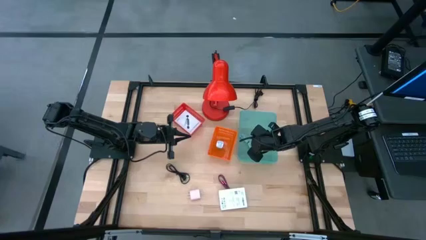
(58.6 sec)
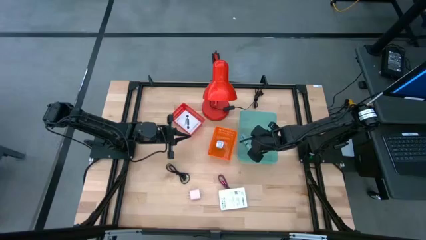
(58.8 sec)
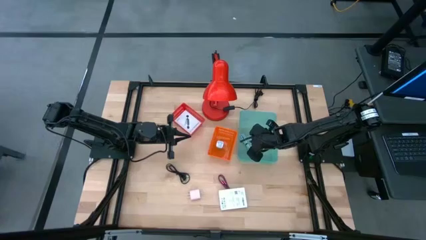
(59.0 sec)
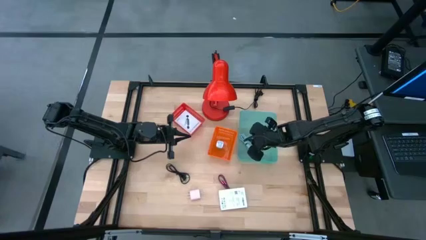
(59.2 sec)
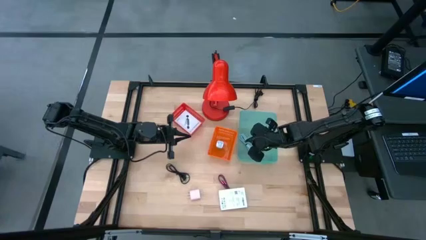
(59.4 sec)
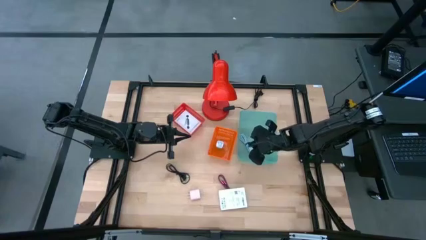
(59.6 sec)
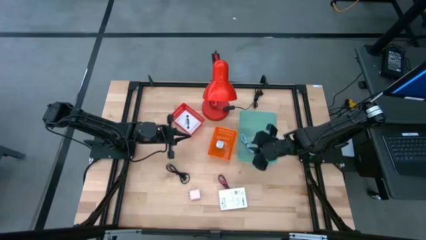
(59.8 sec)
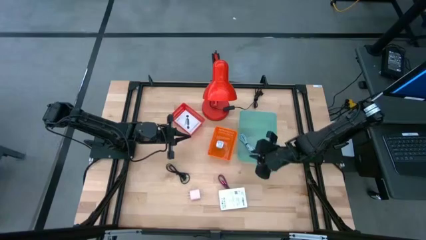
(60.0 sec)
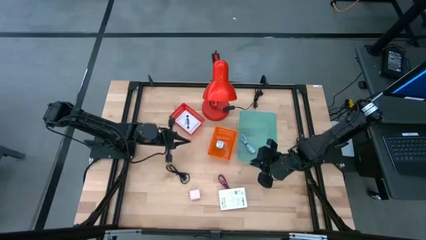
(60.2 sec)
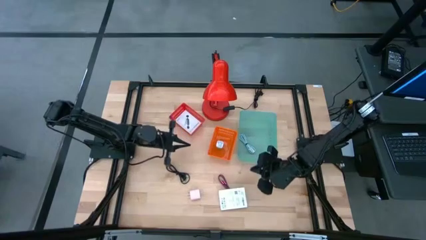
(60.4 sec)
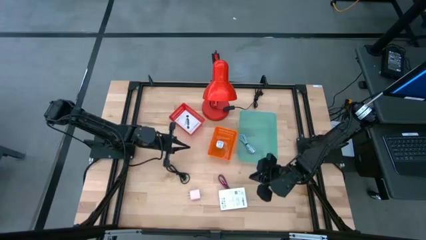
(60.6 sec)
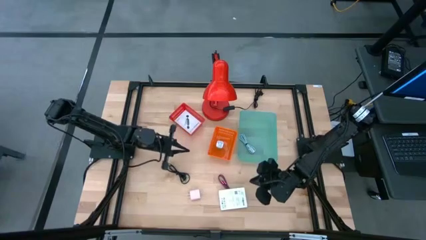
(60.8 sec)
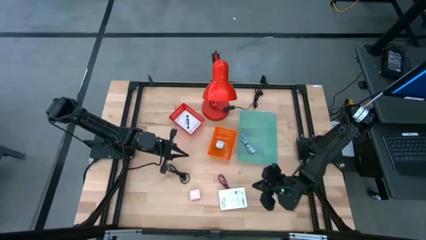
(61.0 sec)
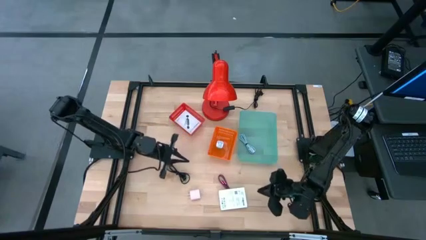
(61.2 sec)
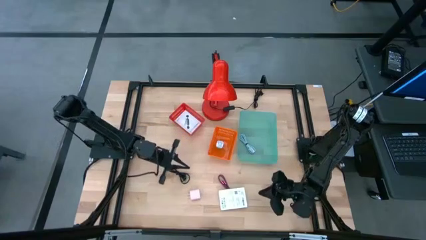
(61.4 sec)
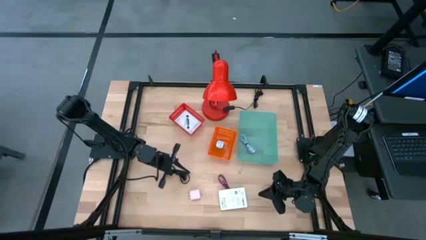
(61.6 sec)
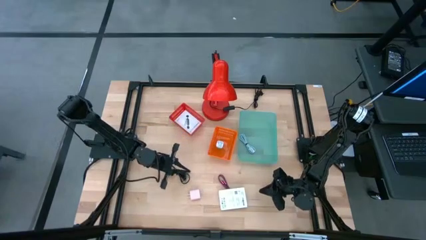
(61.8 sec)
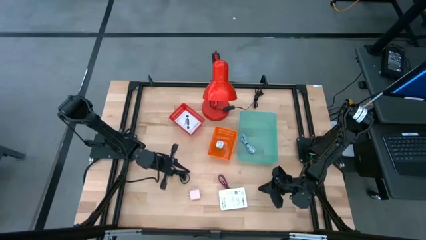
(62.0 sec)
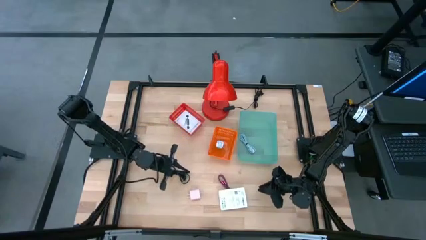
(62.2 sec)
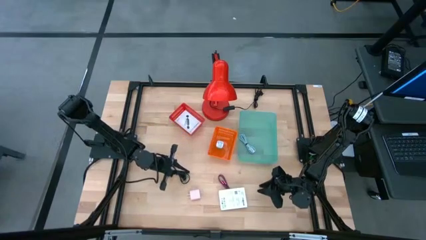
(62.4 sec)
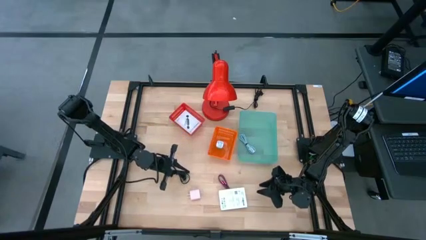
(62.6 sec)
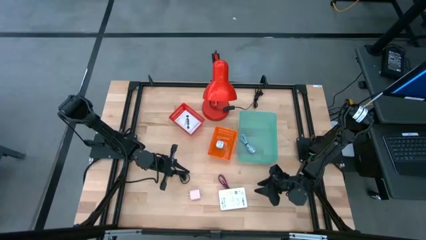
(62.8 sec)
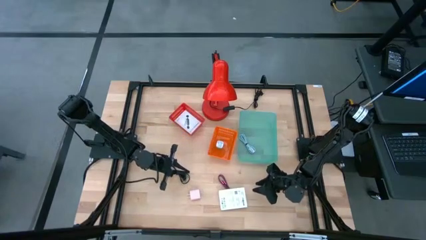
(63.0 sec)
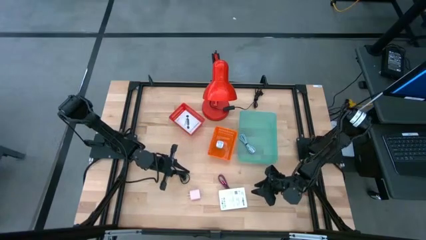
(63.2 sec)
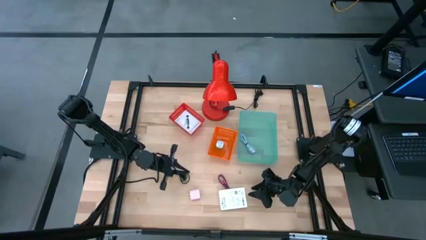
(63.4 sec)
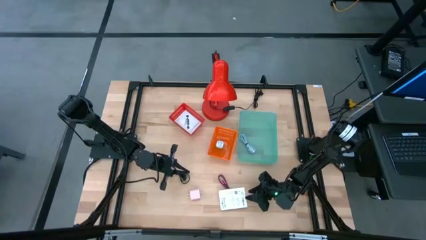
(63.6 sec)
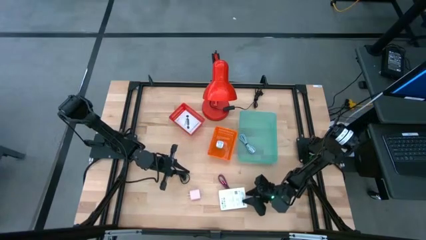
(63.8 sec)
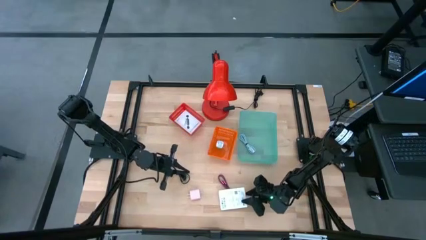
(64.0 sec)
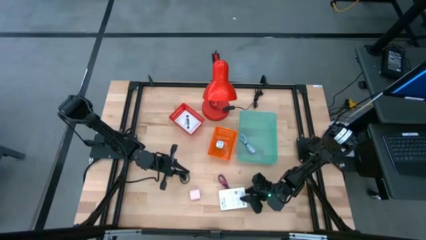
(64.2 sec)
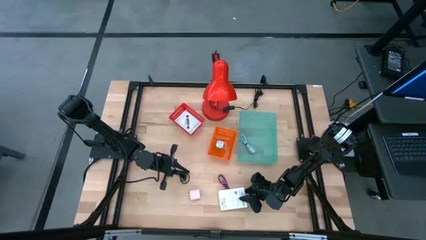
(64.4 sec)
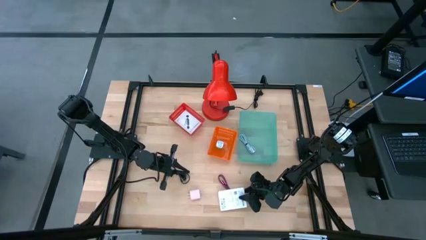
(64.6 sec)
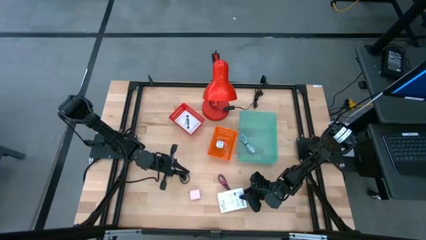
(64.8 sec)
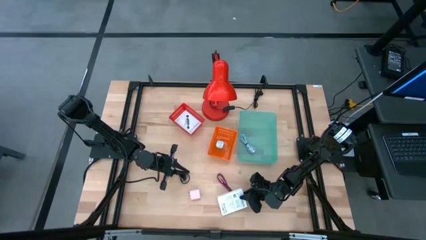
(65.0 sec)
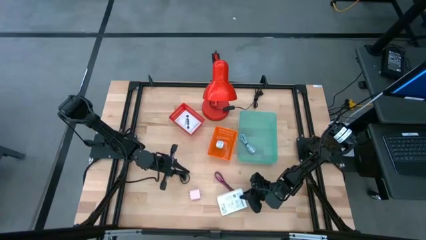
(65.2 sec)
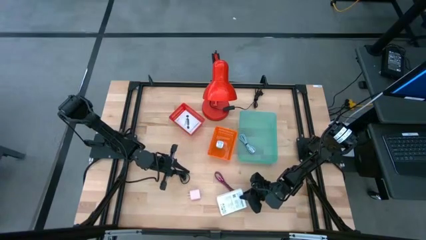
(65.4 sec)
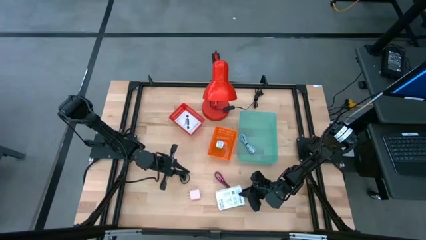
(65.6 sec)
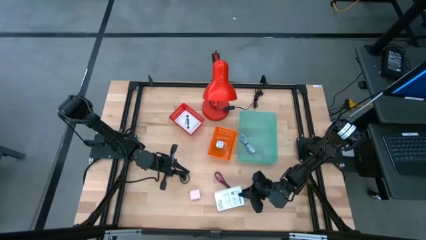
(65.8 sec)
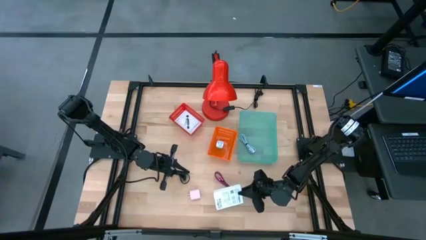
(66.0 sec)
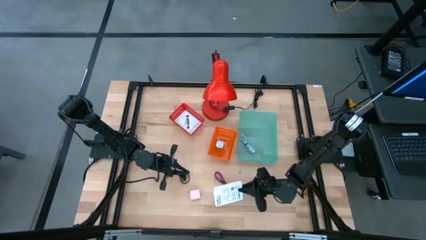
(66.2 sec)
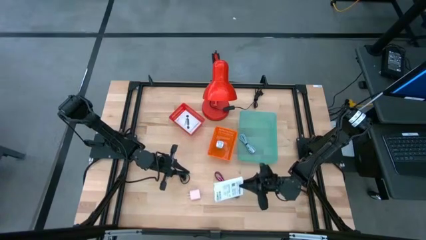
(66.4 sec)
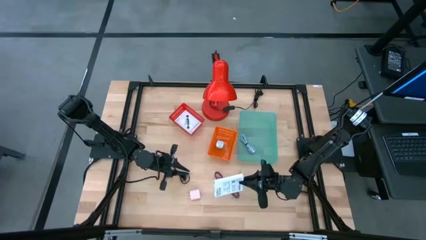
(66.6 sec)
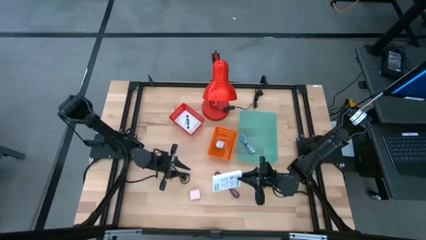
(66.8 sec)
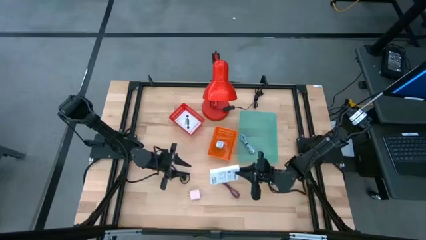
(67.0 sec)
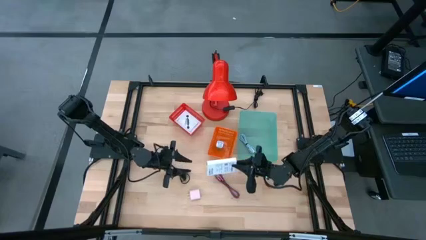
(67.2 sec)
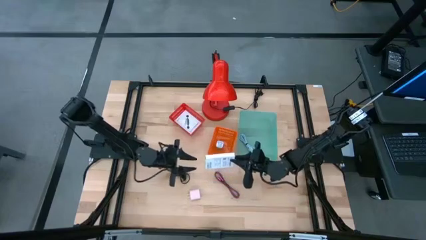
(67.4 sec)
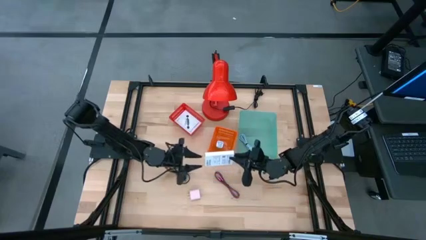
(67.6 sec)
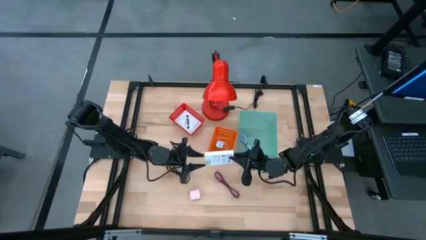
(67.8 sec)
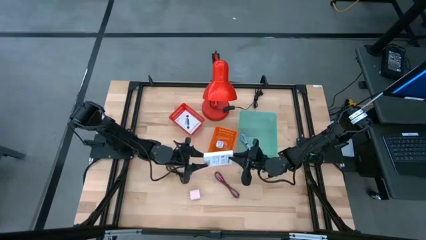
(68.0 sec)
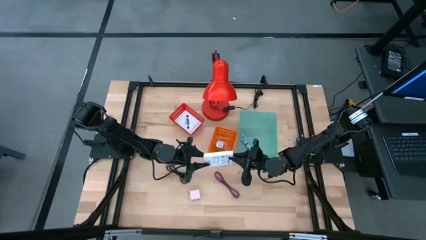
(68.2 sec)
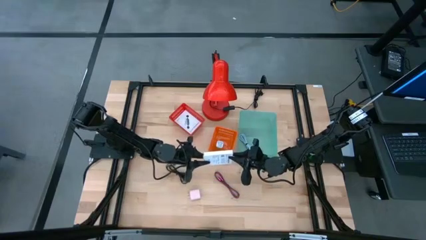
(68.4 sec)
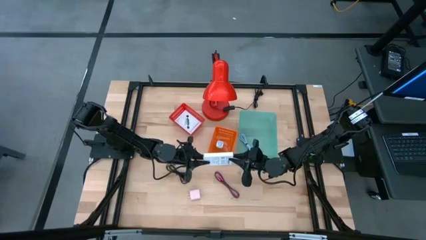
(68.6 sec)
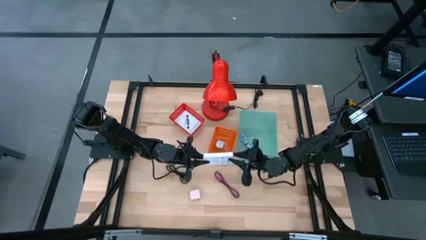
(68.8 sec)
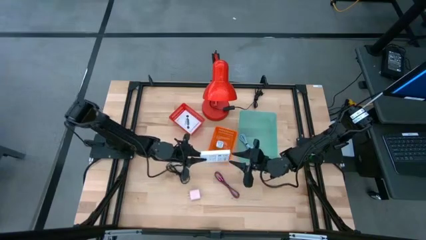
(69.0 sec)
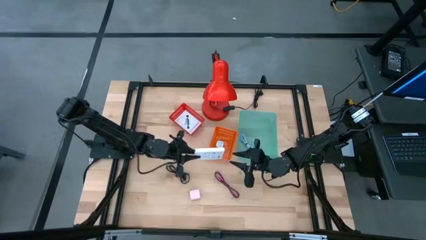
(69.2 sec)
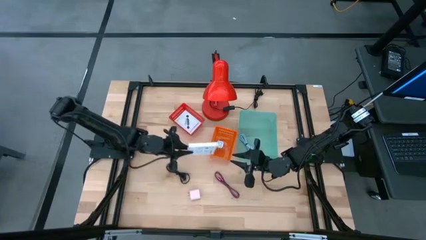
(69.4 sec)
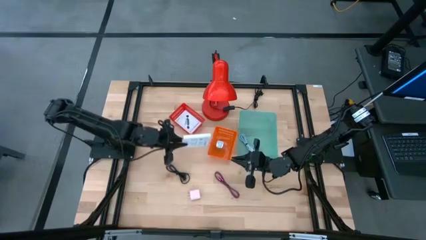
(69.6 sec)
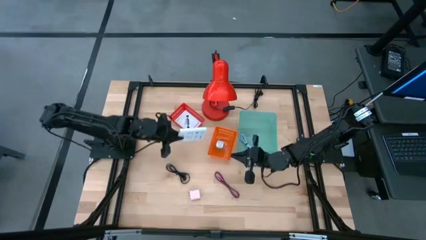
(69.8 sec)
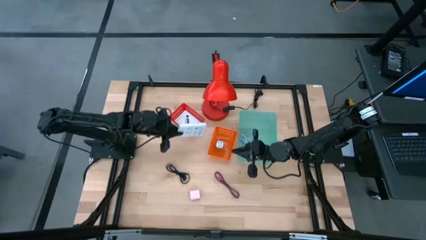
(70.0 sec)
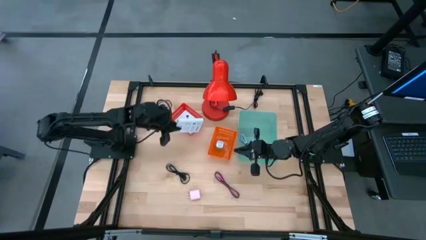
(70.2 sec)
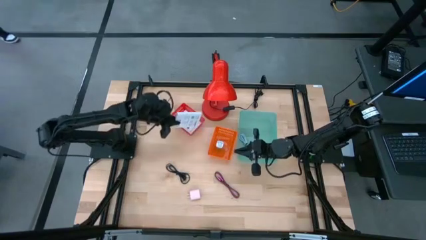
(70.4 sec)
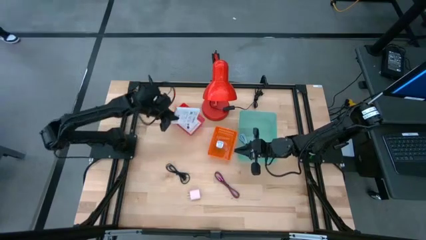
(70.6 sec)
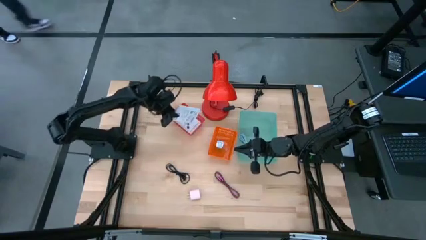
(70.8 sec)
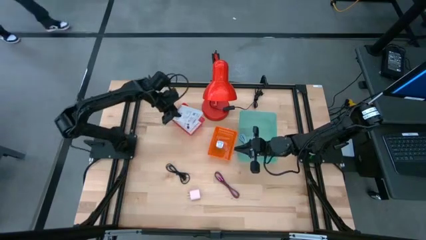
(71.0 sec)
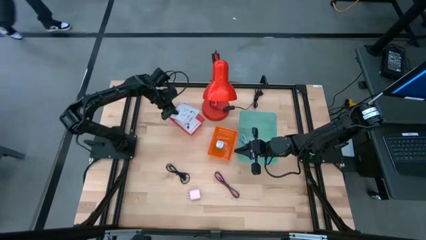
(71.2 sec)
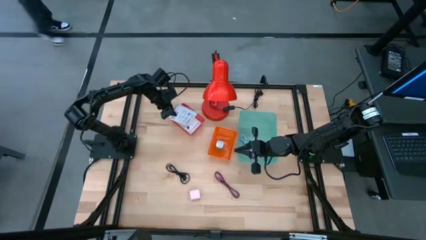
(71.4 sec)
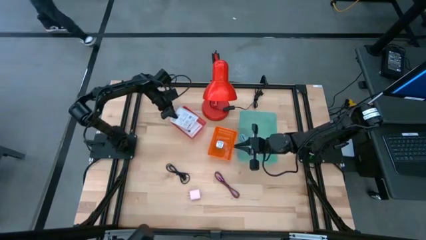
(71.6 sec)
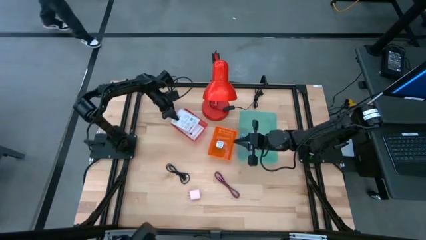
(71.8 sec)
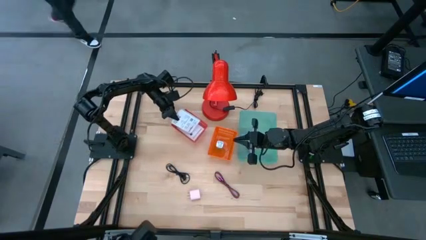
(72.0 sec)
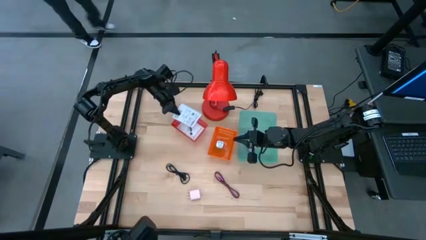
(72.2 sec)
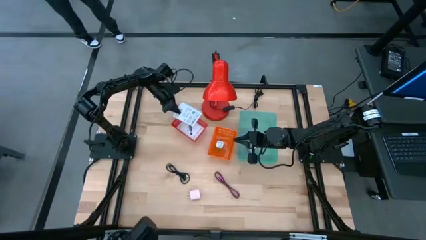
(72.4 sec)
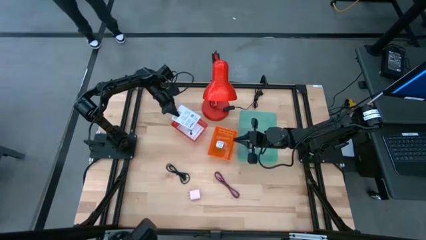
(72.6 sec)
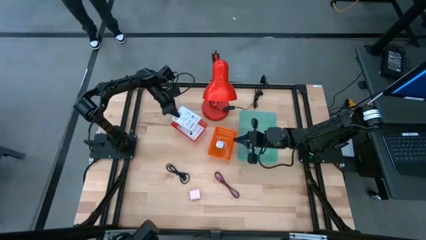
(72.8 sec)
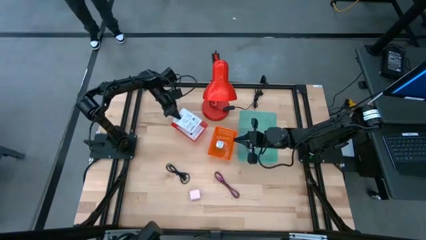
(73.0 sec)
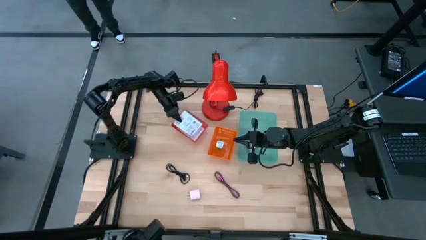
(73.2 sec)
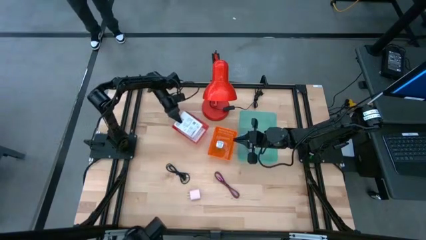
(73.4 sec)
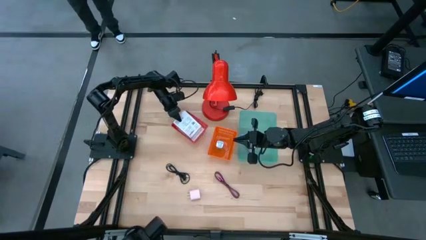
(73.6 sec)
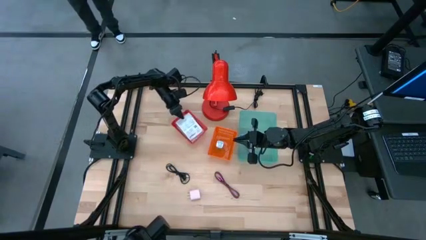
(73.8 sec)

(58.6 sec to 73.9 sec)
Task: Pick and place items into bin
Put the card reader box into the red bin
